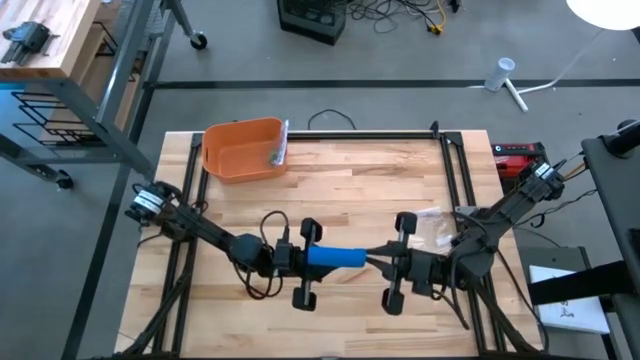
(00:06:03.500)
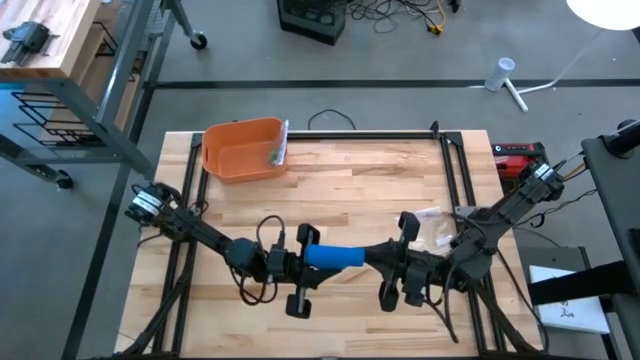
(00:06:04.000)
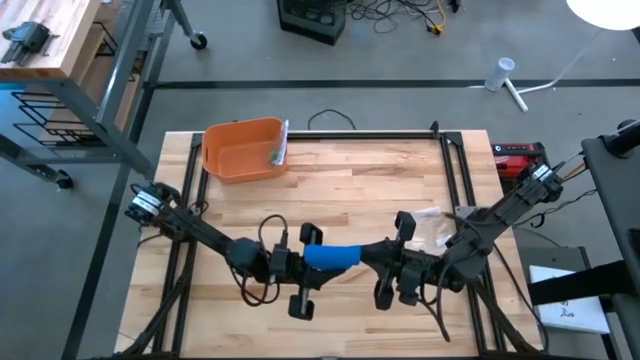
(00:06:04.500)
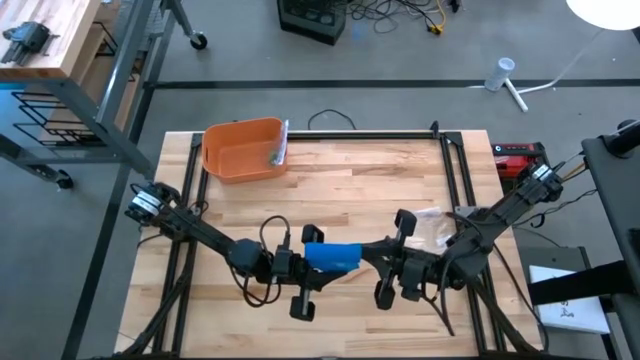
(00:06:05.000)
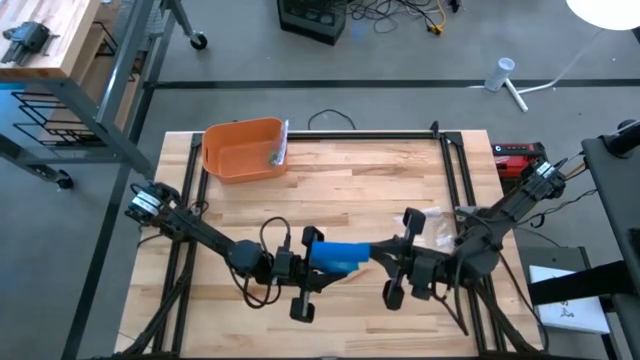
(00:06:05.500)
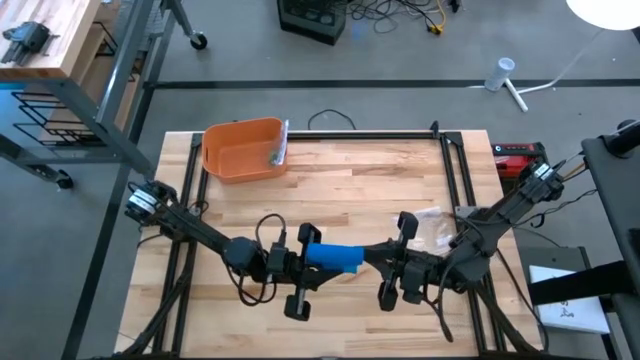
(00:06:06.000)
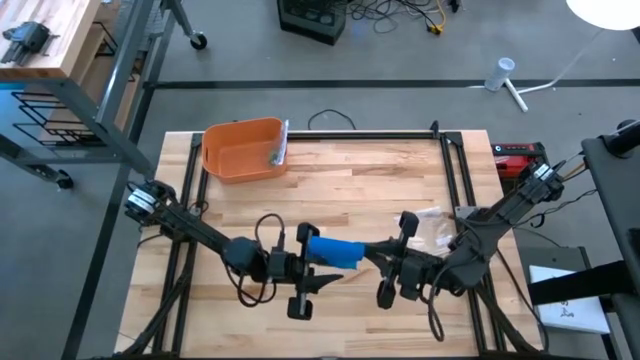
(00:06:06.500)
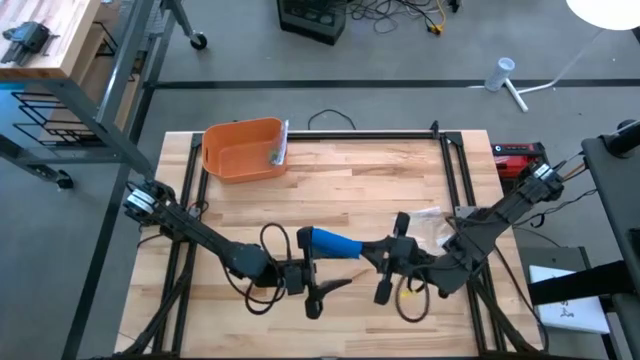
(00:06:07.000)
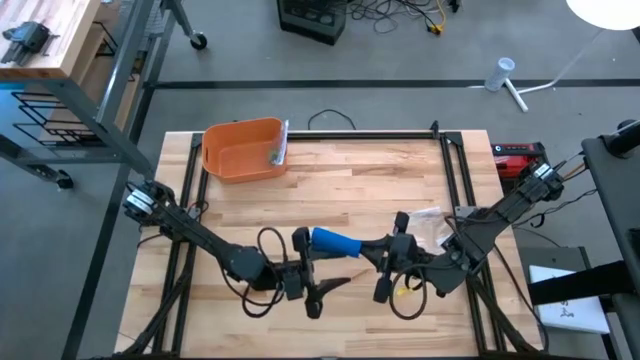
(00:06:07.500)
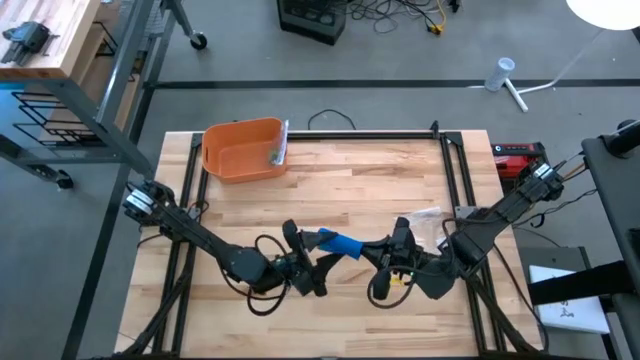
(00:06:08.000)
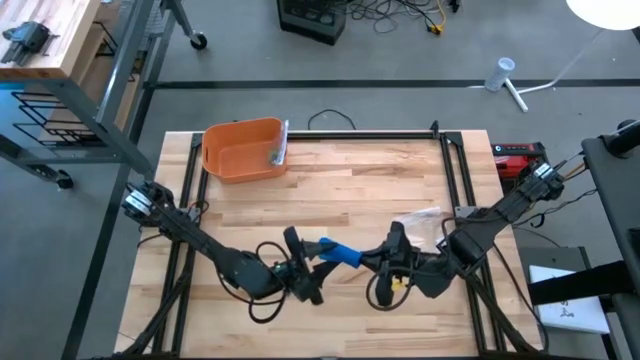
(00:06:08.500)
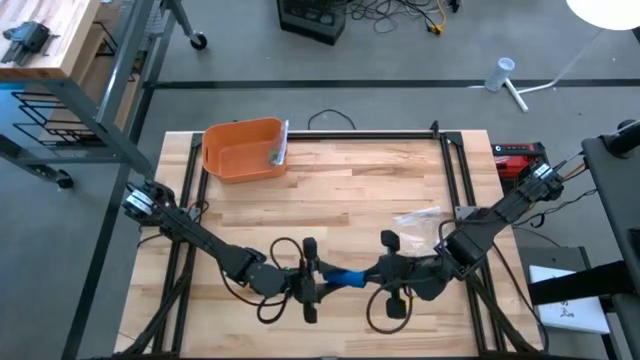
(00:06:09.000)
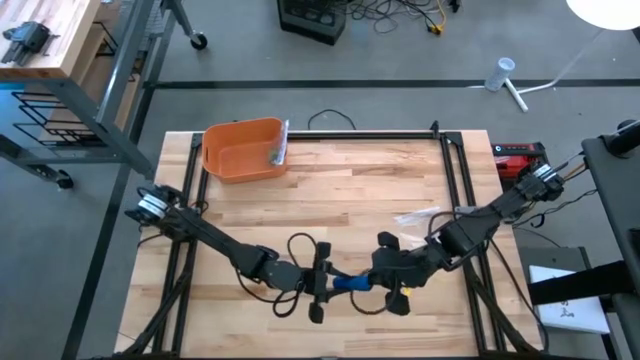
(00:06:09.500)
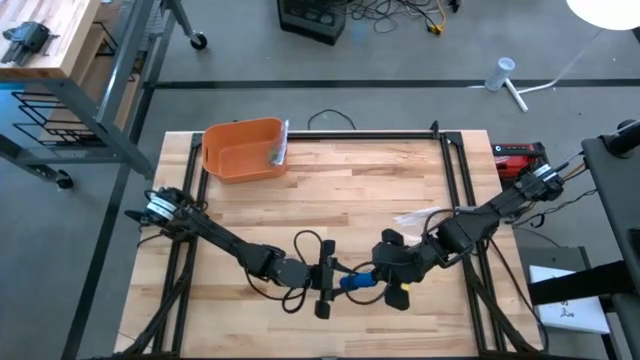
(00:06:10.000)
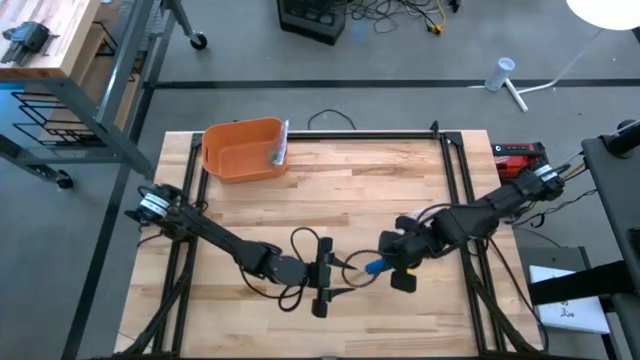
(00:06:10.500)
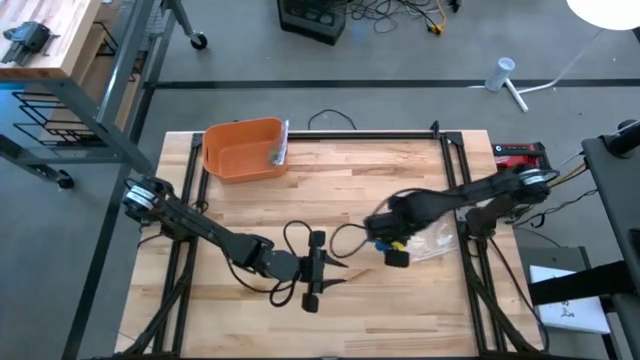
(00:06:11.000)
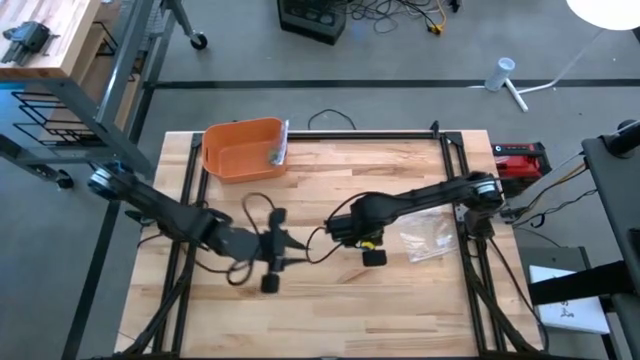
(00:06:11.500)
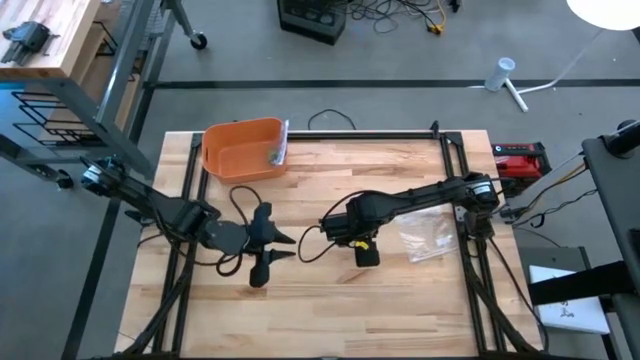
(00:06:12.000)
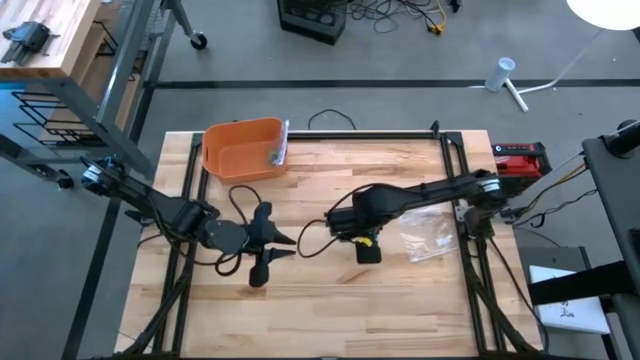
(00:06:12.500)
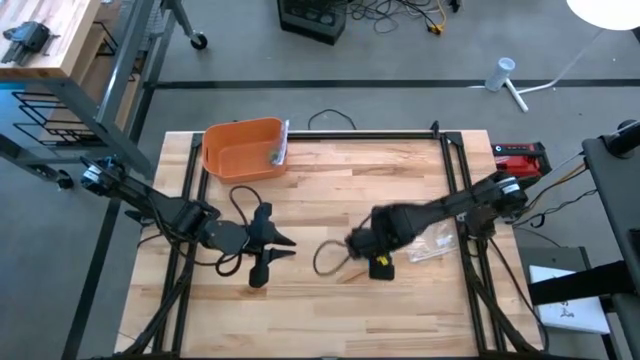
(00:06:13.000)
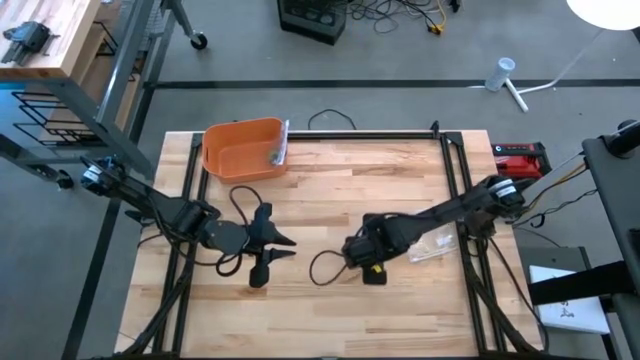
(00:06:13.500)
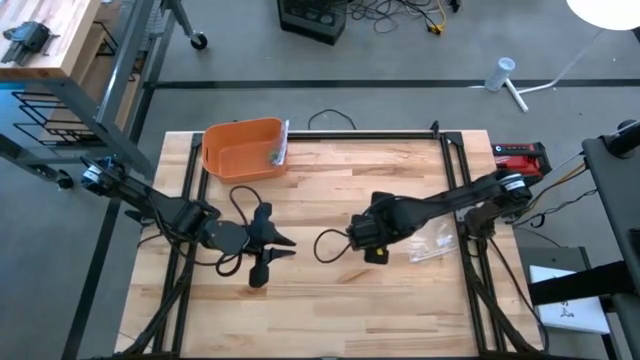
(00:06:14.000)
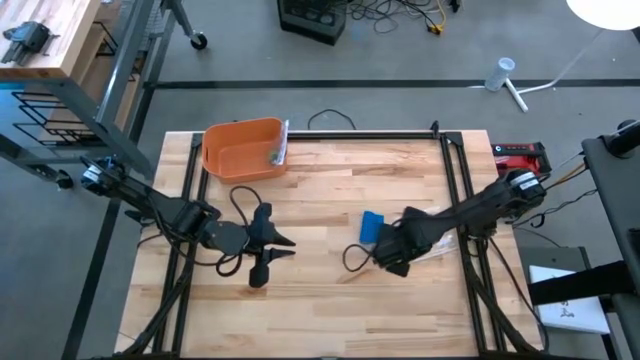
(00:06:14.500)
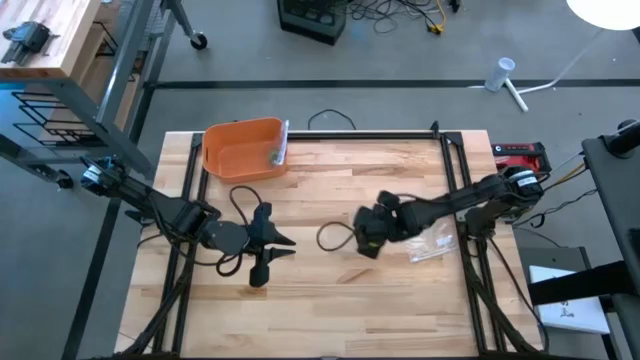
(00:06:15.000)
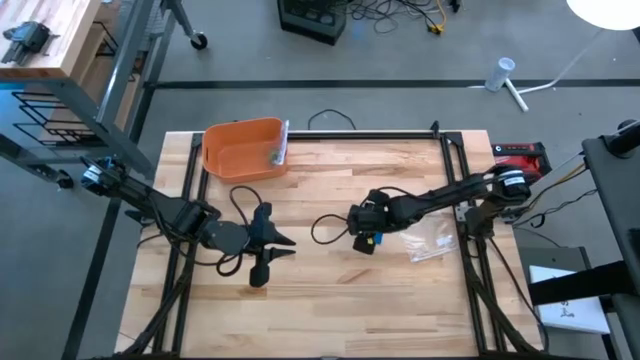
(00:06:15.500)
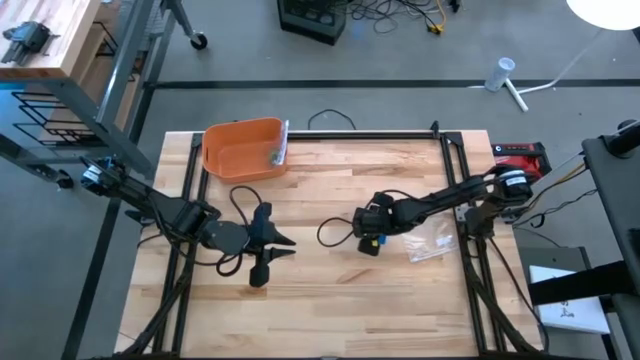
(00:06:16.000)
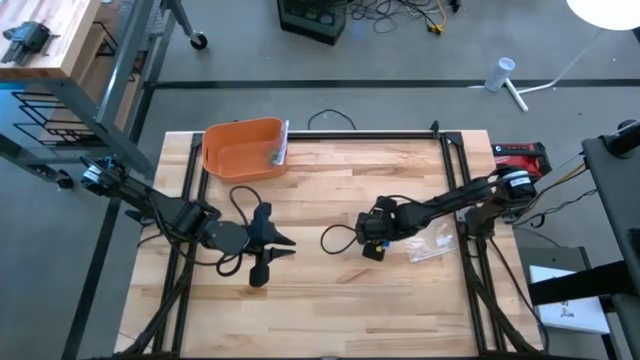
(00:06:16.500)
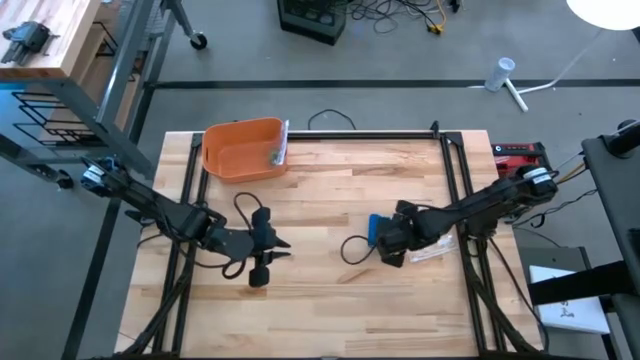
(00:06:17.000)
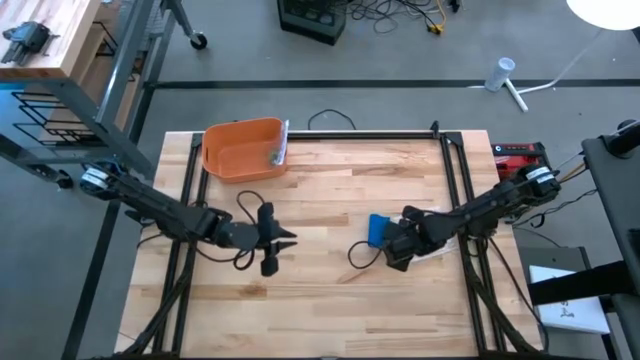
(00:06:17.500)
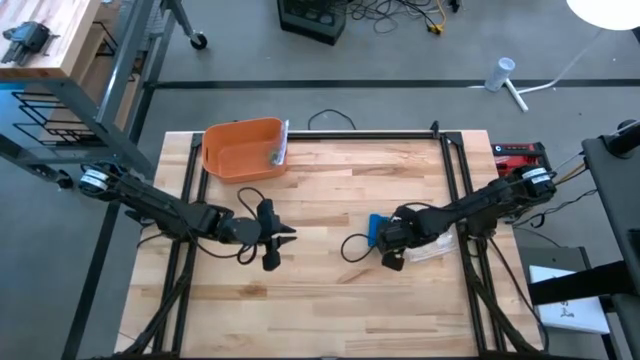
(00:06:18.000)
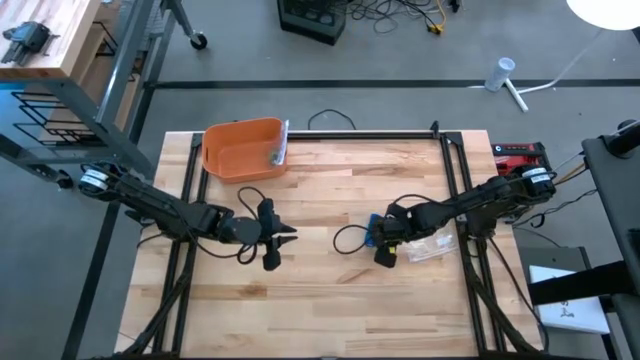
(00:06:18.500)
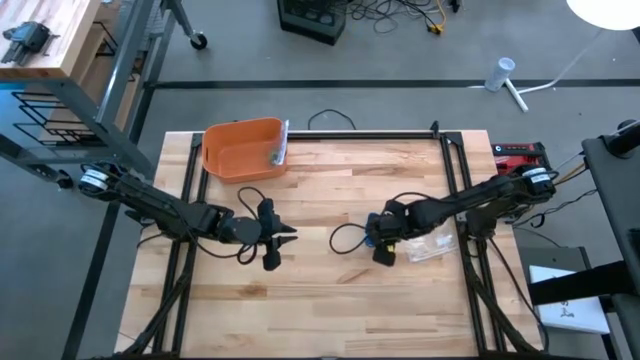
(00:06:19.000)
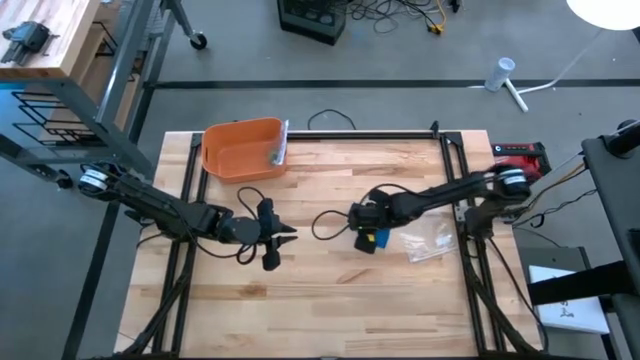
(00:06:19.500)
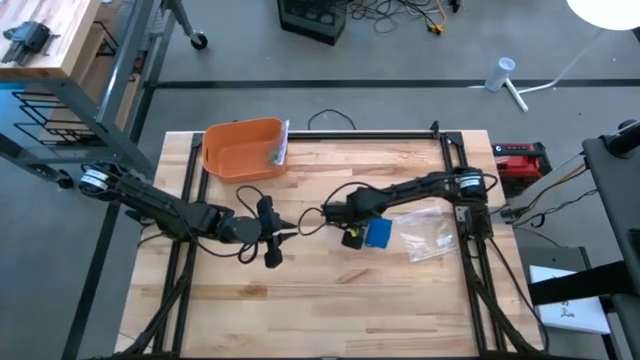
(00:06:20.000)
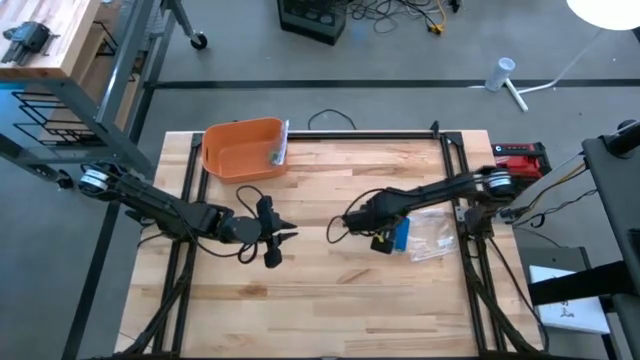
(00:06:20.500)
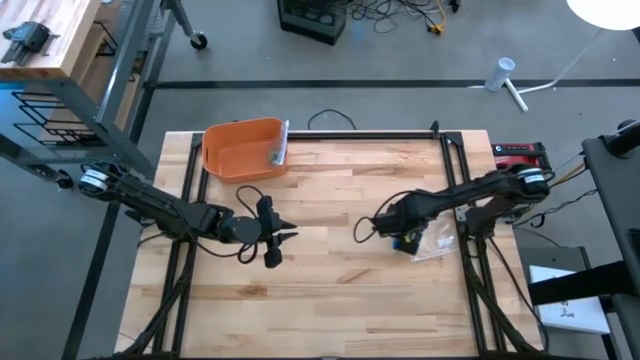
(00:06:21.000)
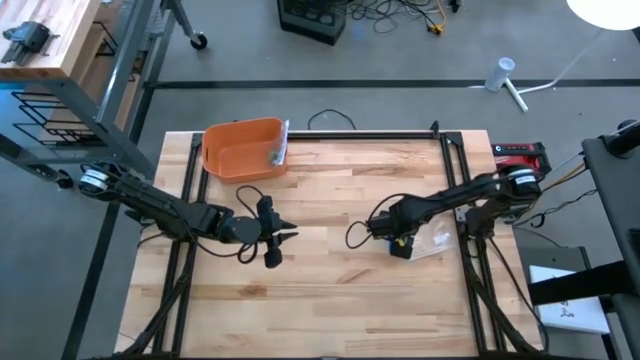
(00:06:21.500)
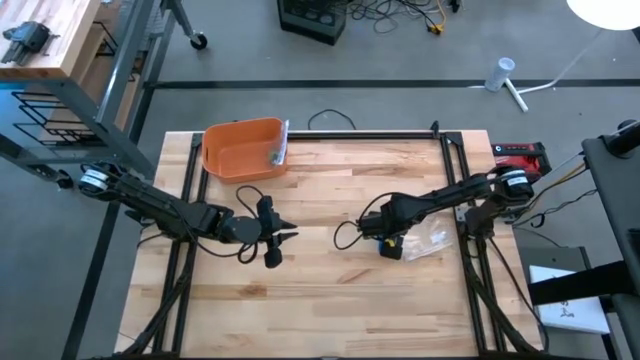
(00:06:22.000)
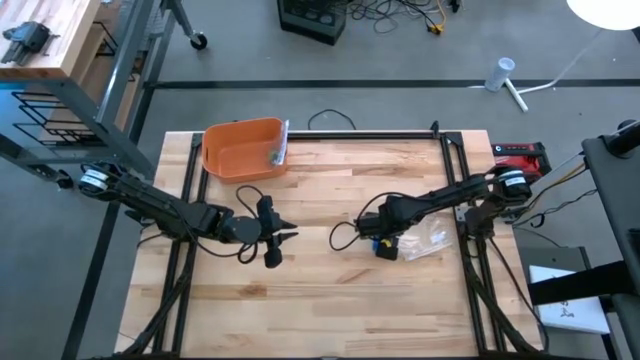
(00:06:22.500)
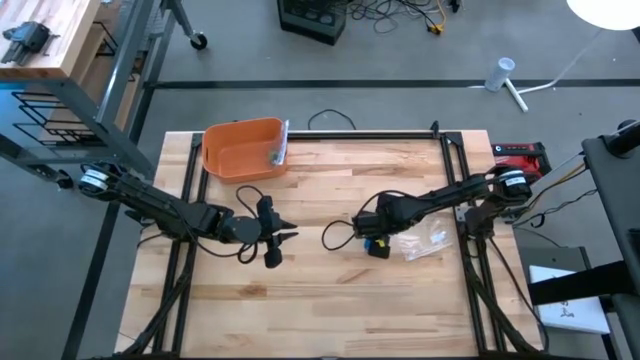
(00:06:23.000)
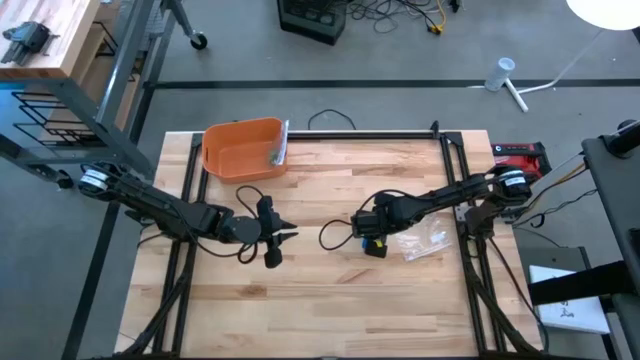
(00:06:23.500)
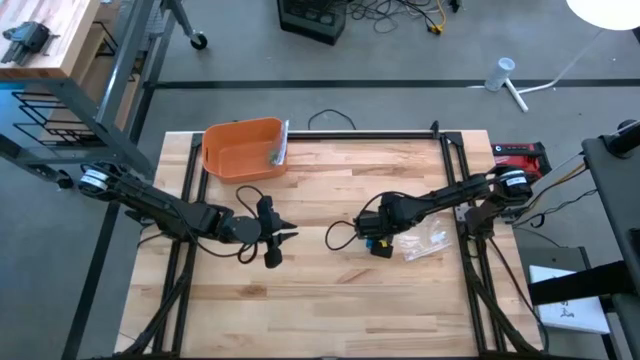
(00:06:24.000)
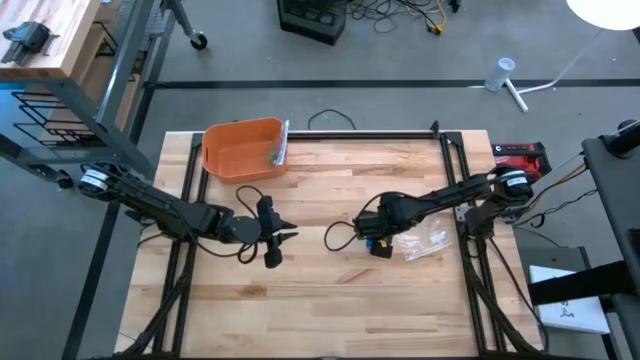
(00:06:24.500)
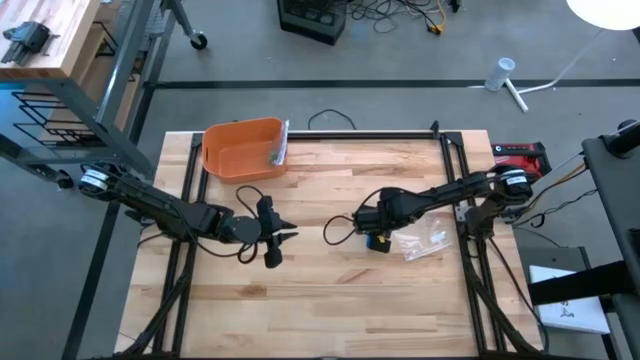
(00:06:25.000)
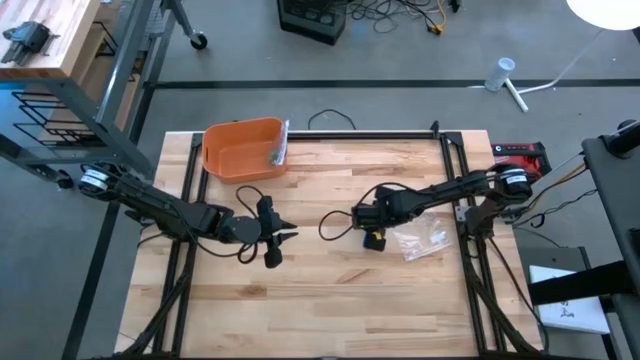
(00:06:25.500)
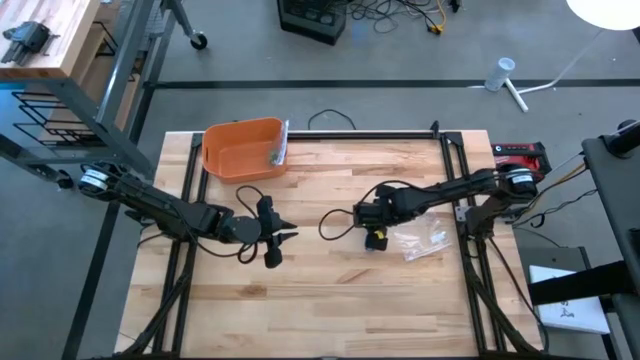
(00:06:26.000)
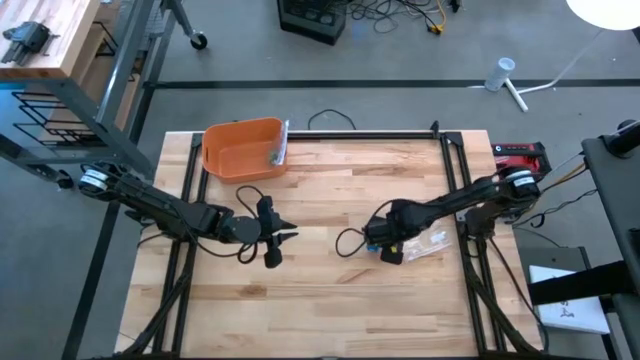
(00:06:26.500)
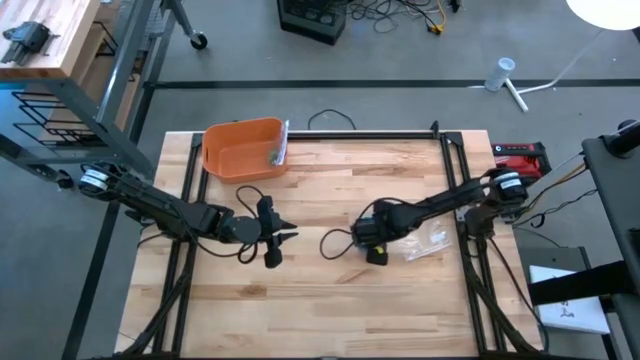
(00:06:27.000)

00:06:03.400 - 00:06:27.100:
Task: Roll bandage
Roll the blue bandage
